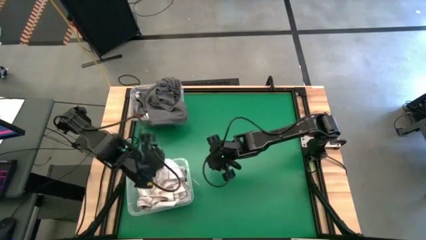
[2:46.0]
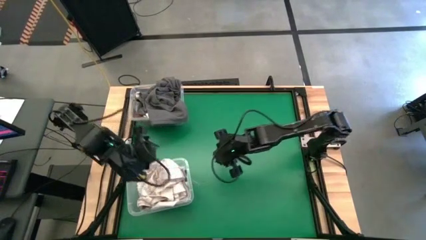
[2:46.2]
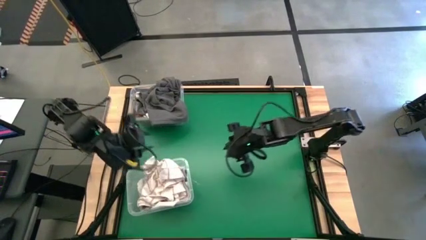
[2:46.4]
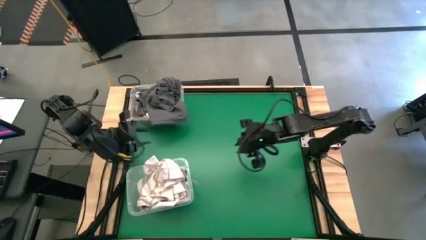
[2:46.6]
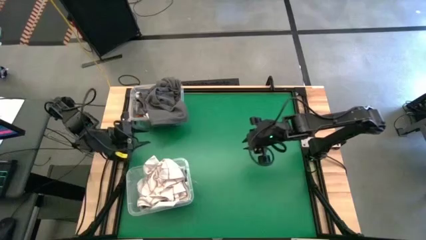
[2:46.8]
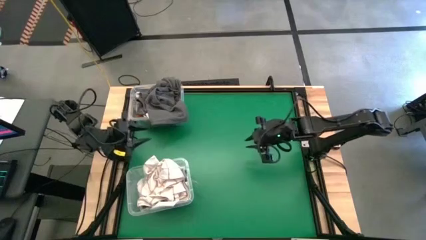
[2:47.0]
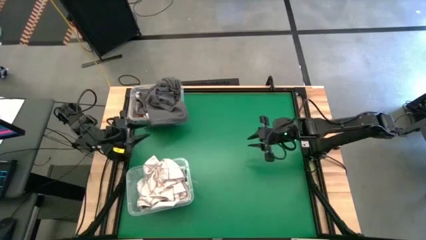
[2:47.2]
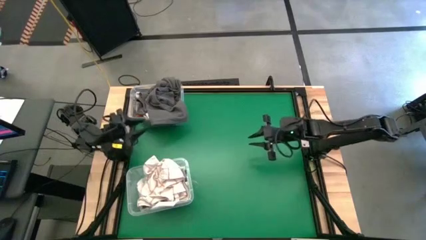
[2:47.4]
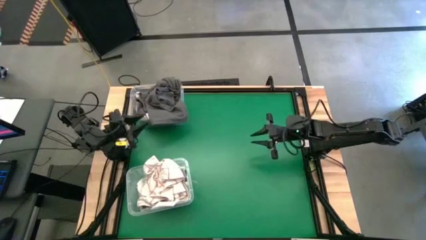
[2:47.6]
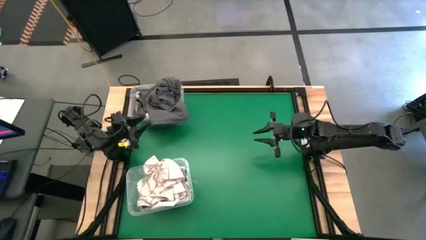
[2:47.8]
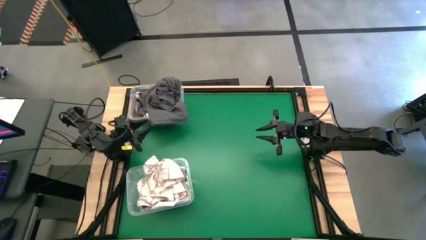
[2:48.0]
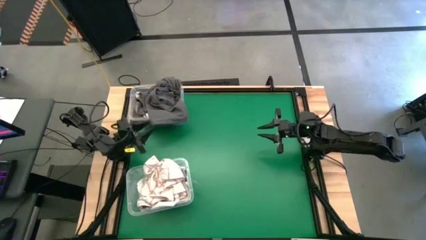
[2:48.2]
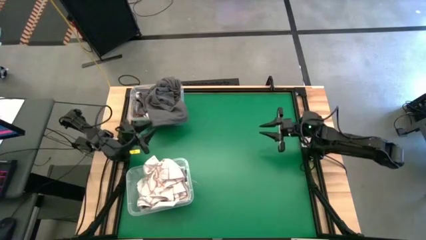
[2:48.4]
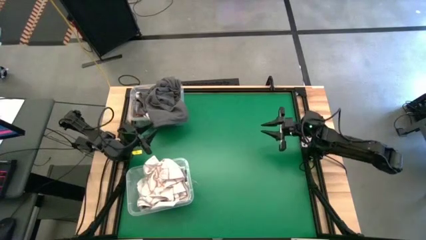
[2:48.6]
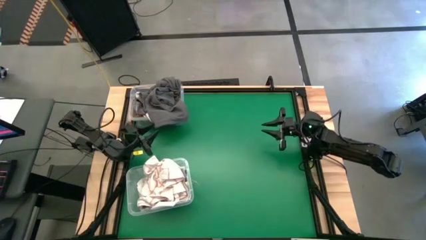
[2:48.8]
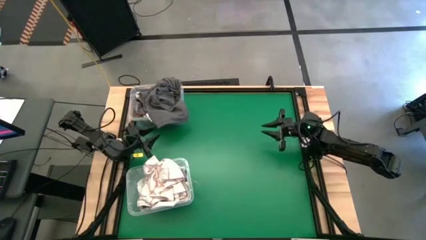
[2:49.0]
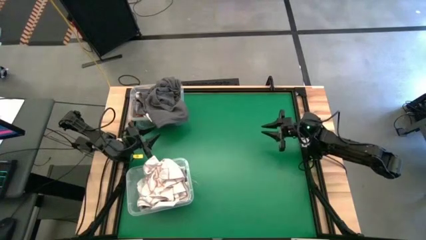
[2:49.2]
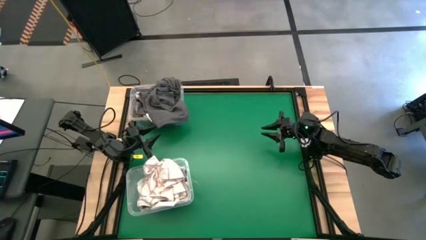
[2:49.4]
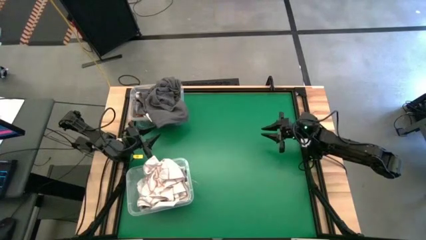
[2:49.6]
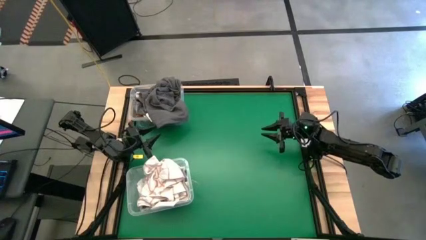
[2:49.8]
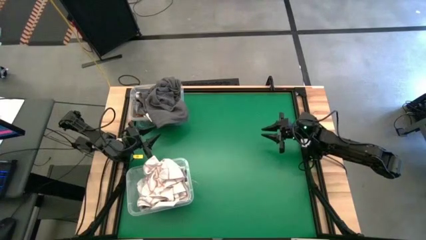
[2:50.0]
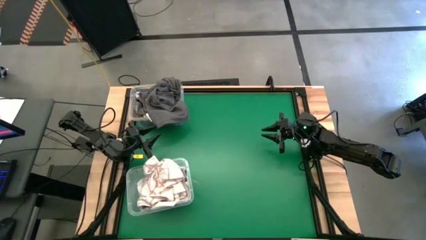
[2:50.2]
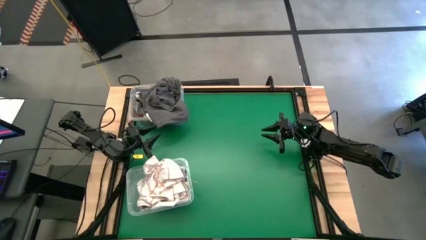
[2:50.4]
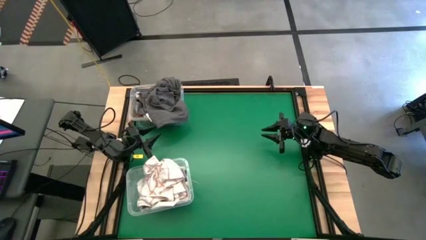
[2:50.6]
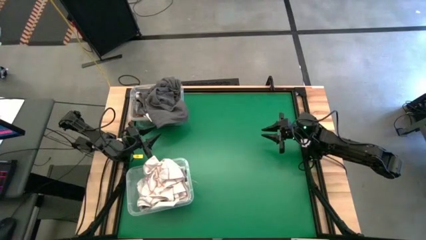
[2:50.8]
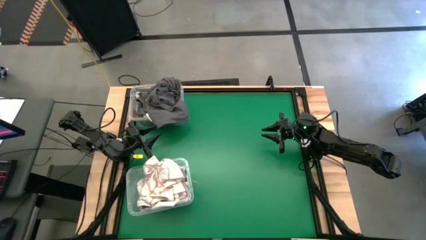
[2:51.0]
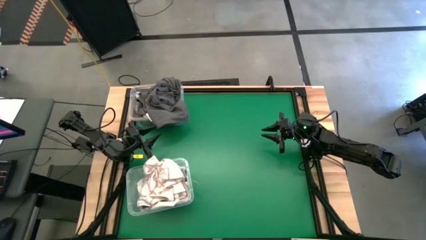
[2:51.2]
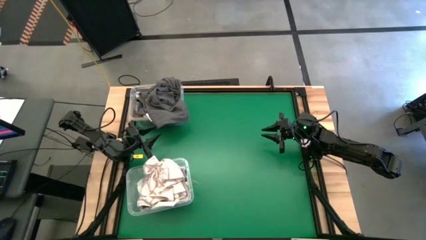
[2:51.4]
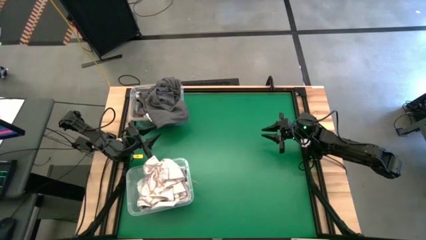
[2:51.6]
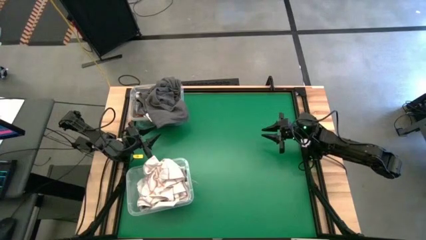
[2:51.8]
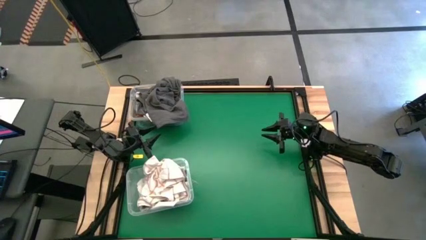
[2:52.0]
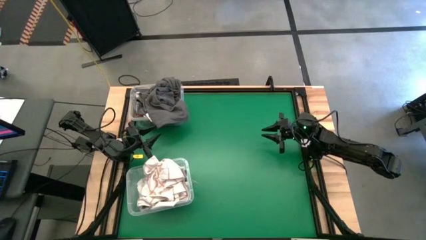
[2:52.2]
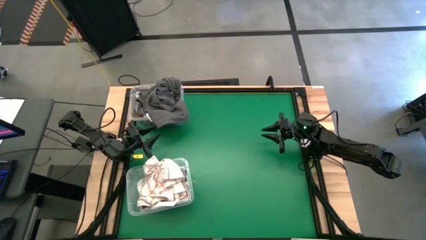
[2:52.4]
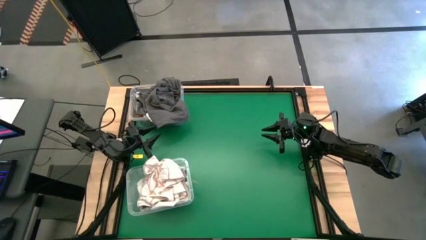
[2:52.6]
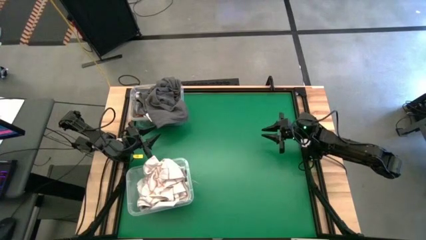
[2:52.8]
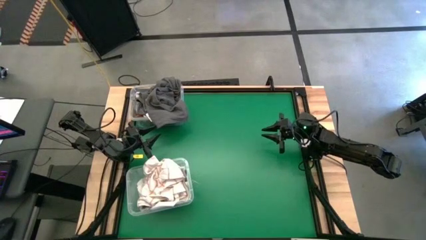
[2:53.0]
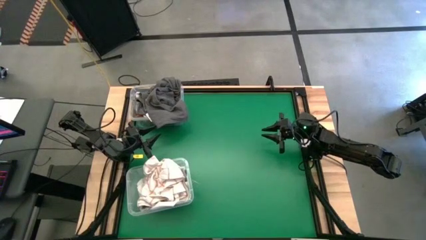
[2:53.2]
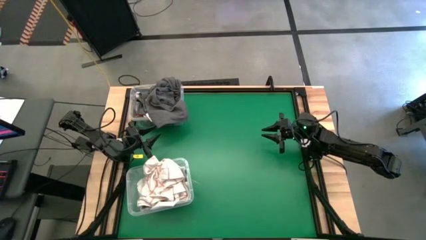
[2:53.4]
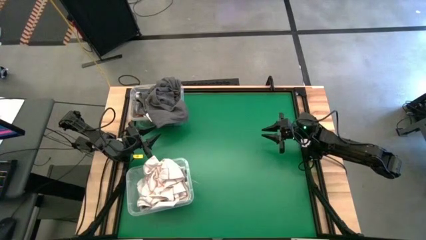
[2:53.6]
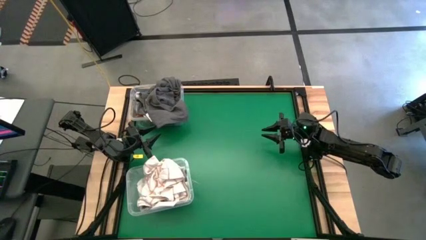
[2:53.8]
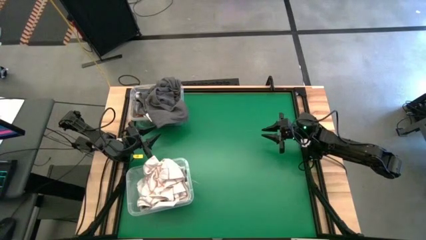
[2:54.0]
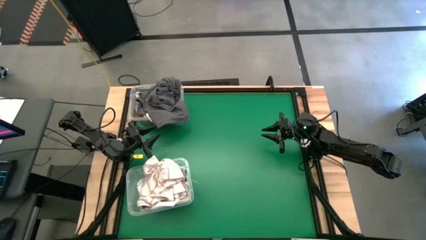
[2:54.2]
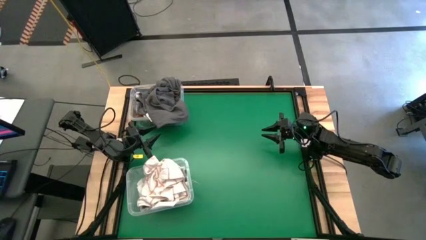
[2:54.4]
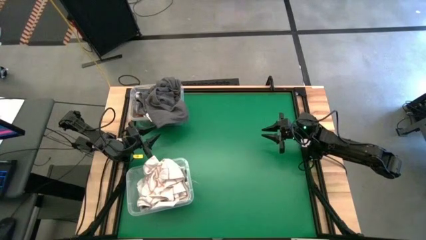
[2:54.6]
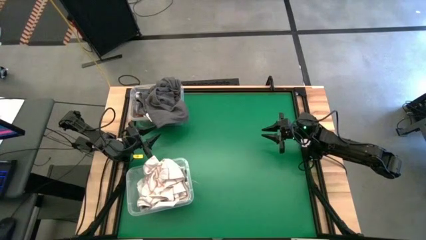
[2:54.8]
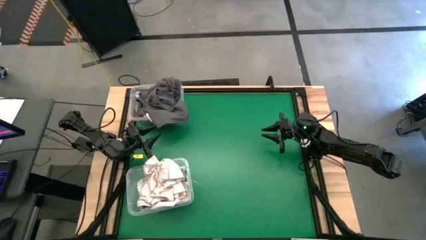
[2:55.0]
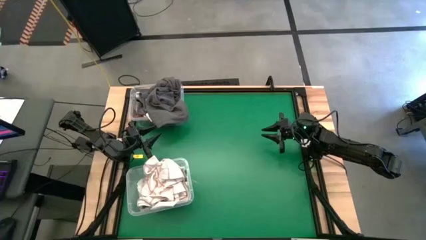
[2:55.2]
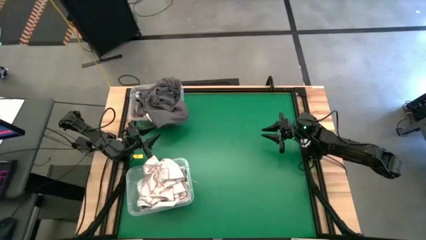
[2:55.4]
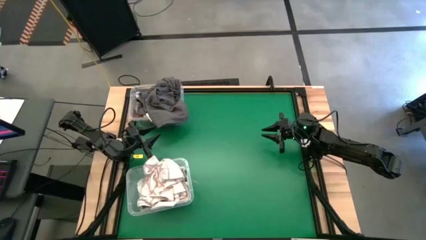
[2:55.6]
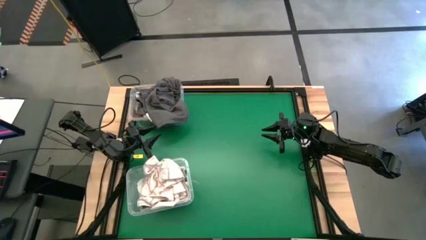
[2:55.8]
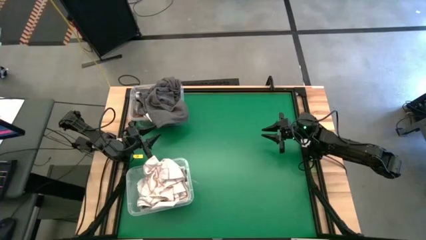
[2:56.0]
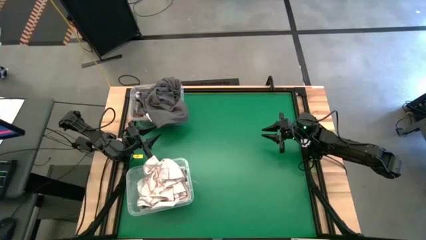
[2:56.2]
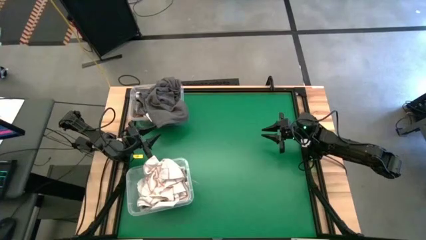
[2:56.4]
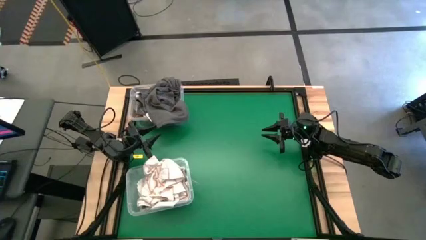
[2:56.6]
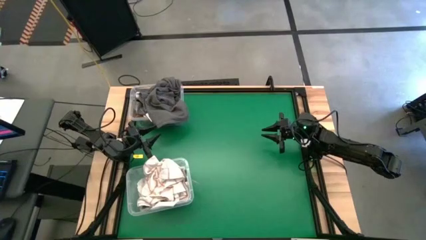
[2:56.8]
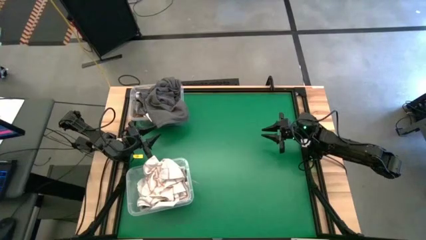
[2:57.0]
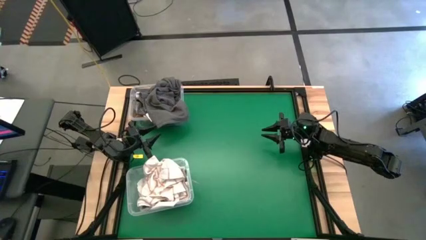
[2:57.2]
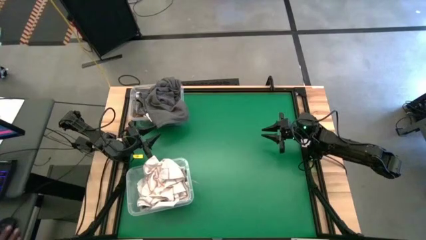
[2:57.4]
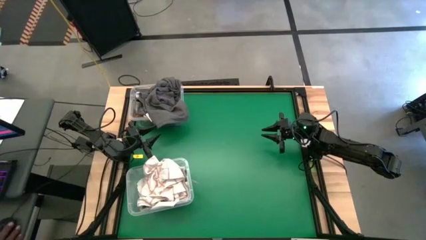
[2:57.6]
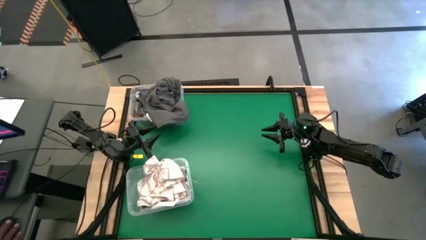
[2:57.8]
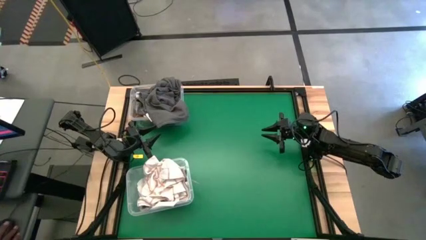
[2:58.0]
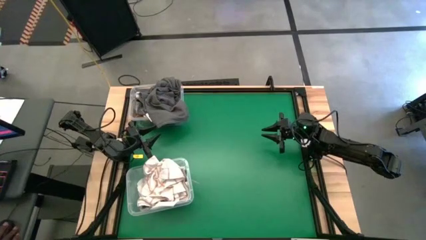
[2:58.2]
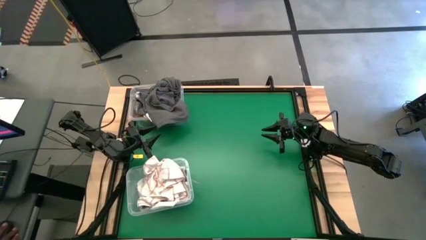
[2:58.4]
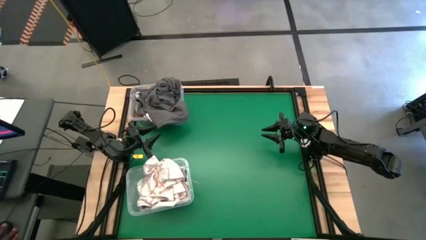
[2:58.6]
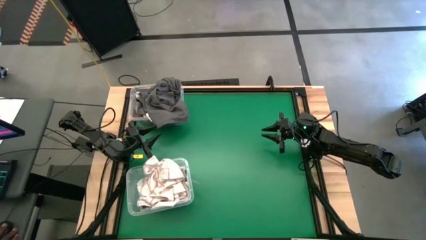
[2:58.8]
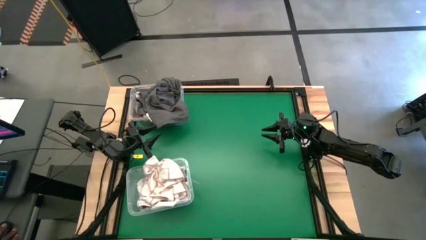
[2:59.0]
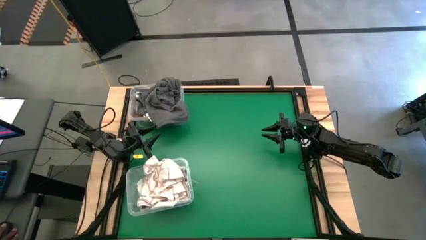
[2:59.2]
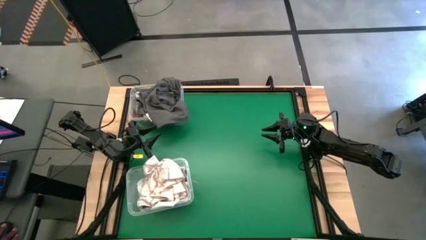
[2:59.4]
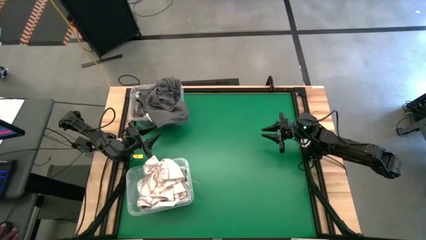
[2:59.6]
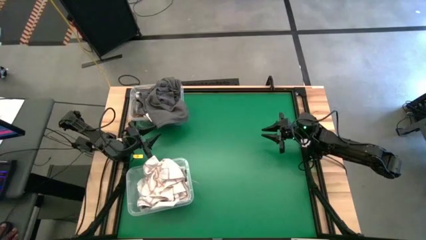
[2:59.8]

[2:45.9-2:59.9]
Task: Sort towels by color in basket
Return to Home Position
